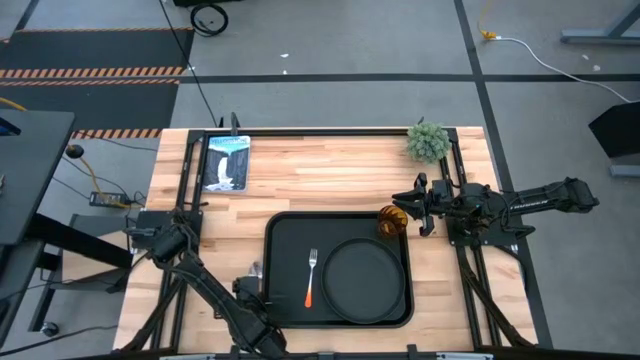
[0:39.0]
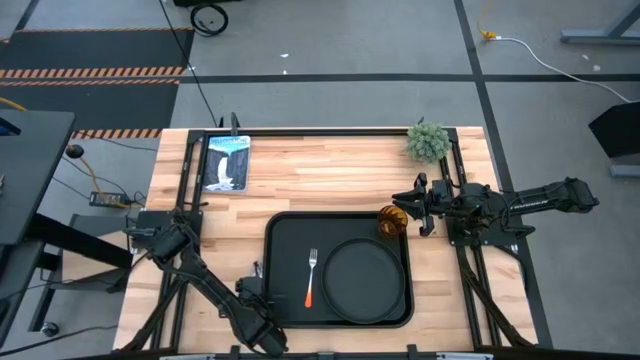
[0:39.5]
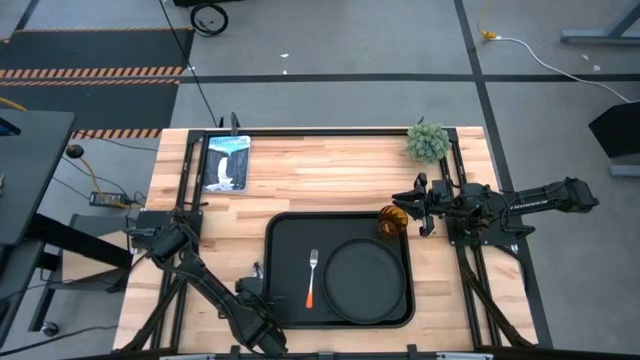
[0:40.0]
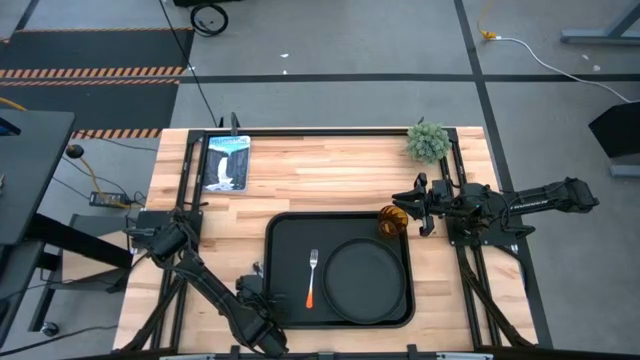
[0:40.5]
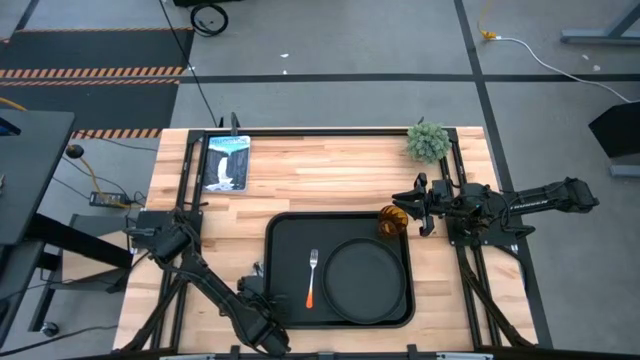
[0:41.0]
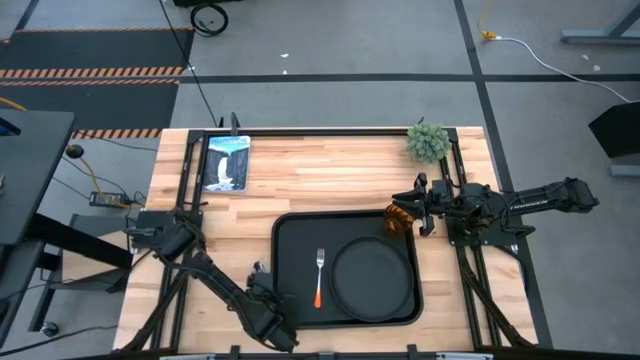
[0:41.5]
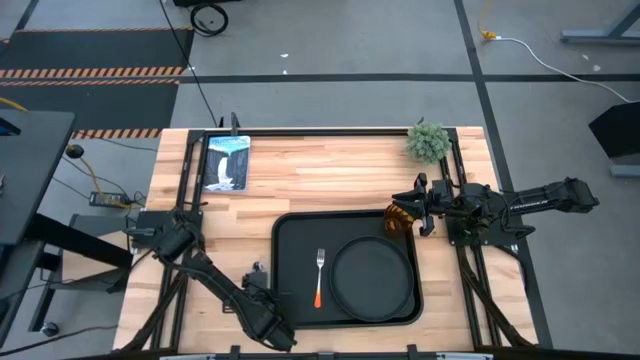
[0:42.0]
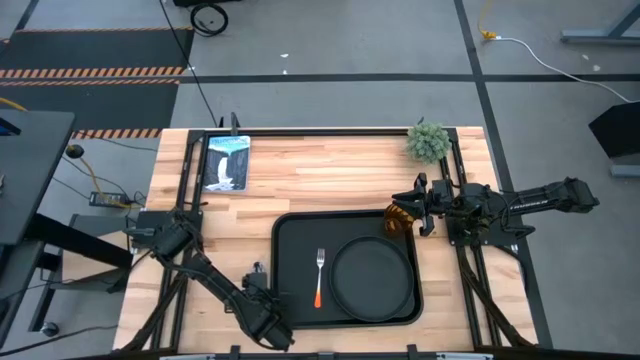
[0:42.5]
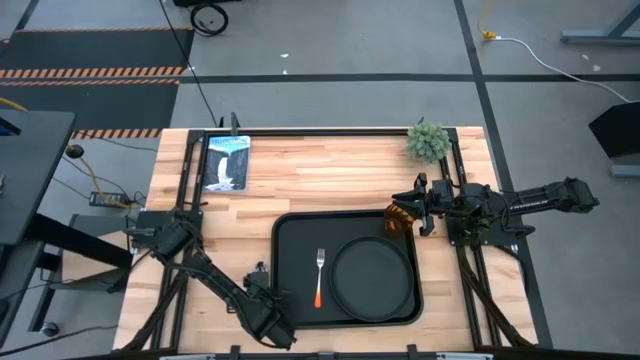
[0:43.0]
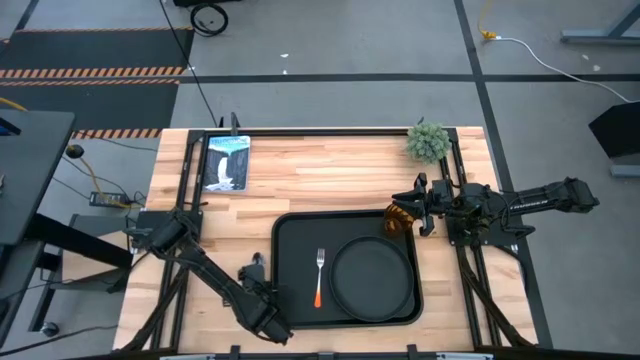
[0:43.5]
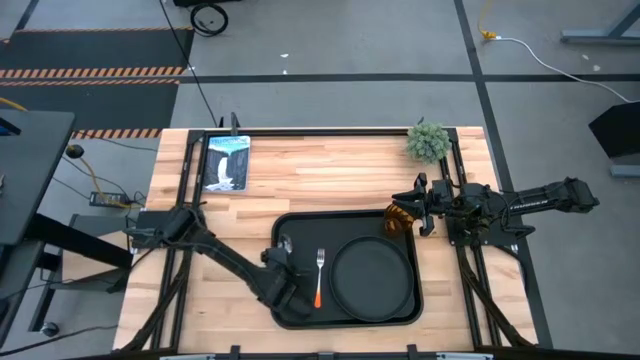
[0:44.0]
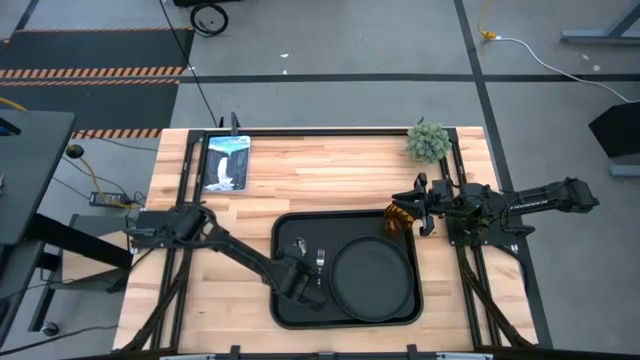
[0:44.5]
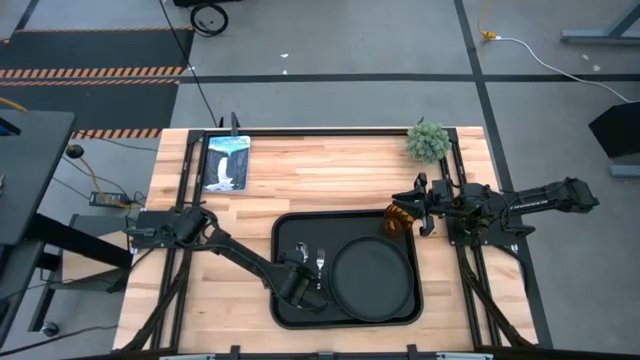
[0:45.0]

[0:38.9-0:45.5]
Task: Pick and place plate/cup/fork/spoon on tray
Put the yellow spoon to the left of the orange fork on the black tray

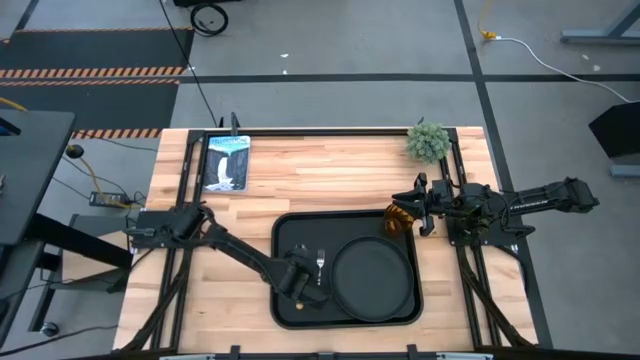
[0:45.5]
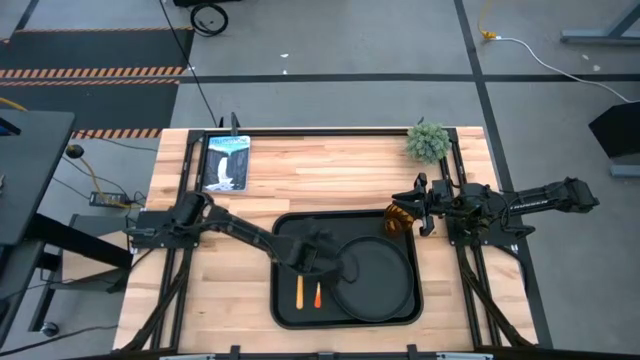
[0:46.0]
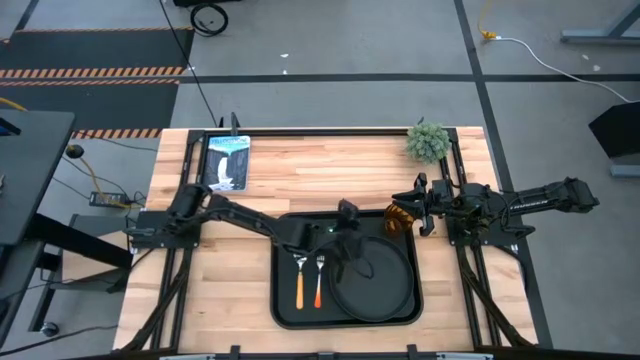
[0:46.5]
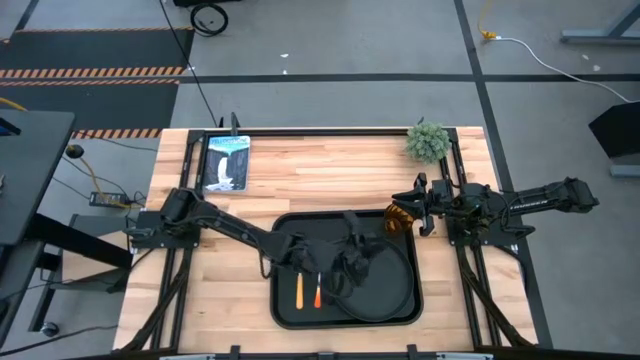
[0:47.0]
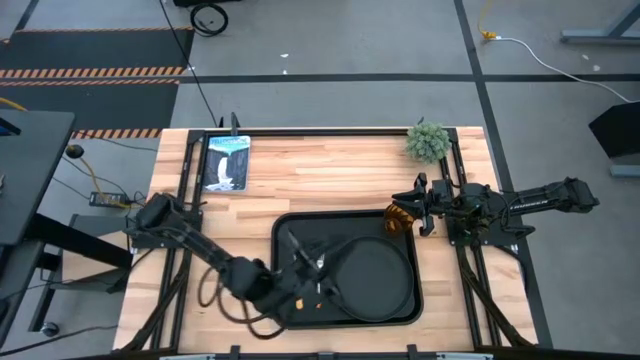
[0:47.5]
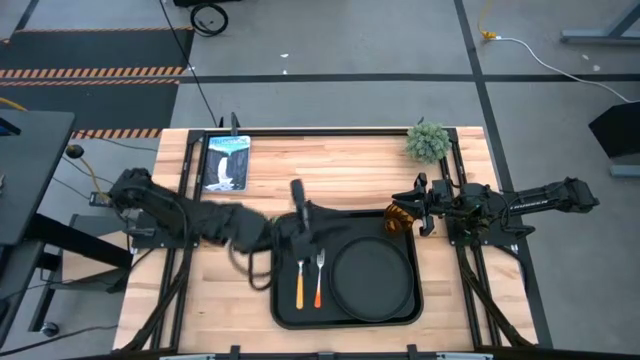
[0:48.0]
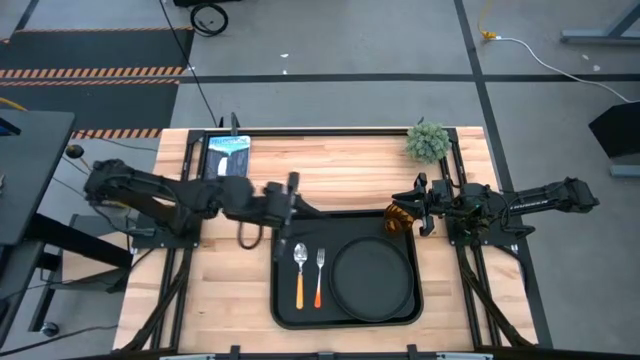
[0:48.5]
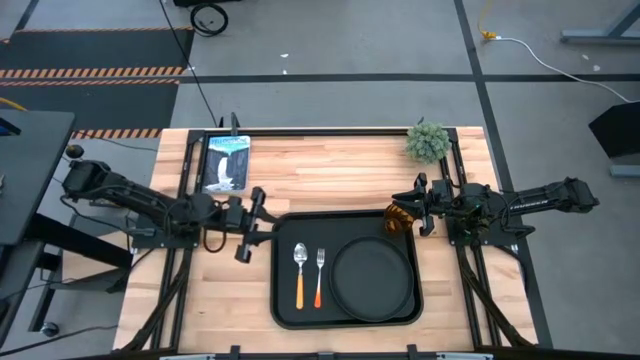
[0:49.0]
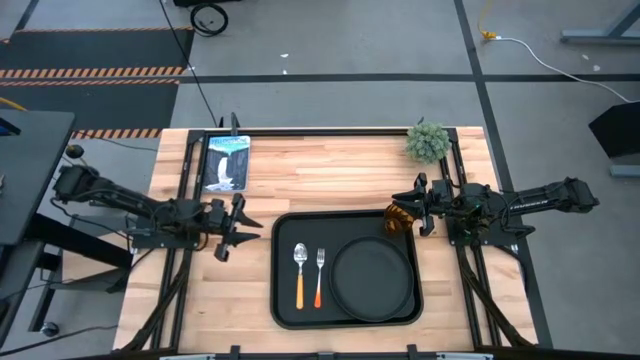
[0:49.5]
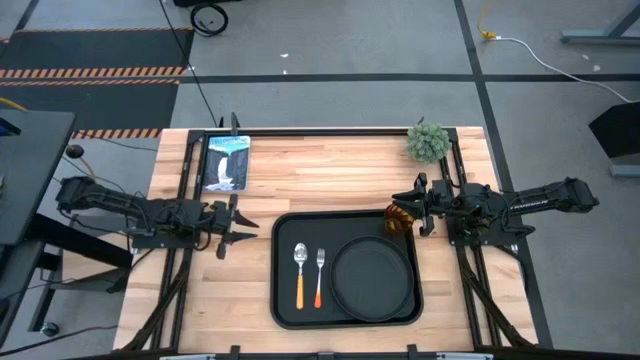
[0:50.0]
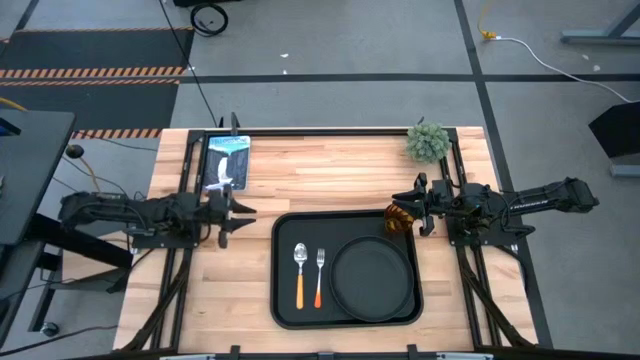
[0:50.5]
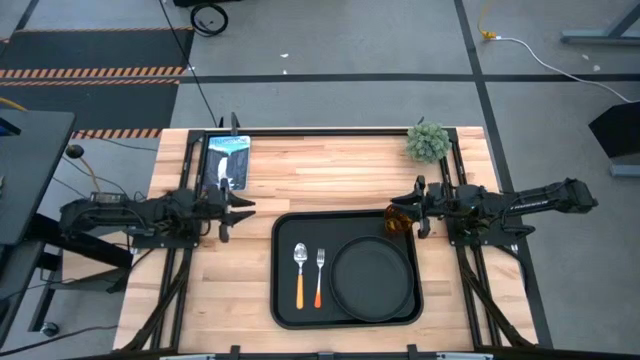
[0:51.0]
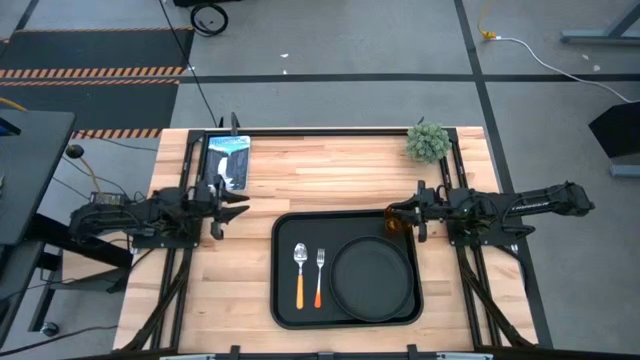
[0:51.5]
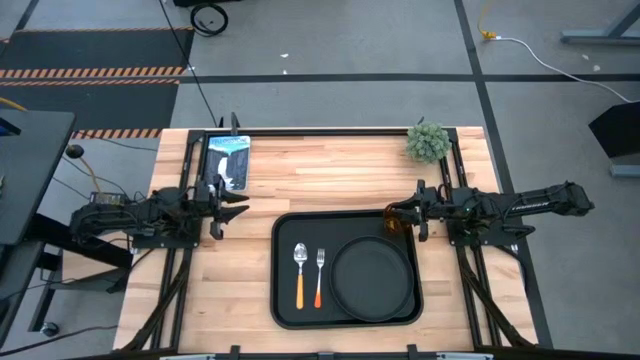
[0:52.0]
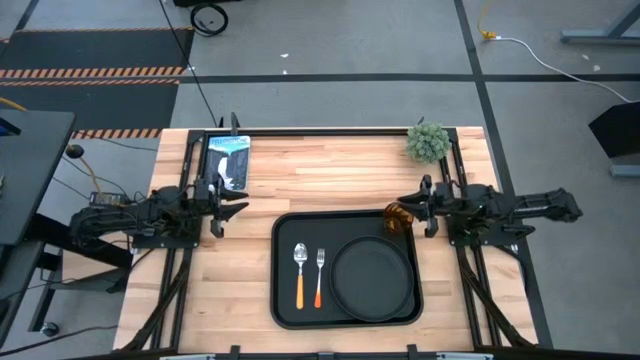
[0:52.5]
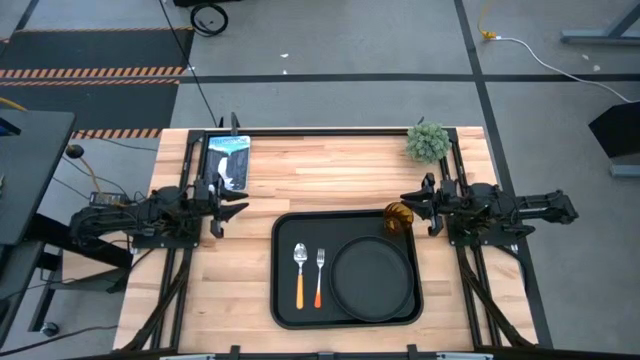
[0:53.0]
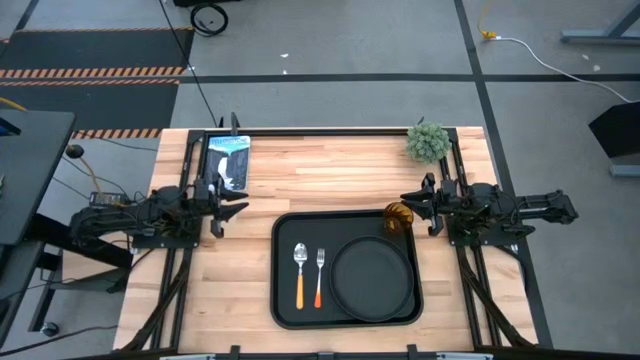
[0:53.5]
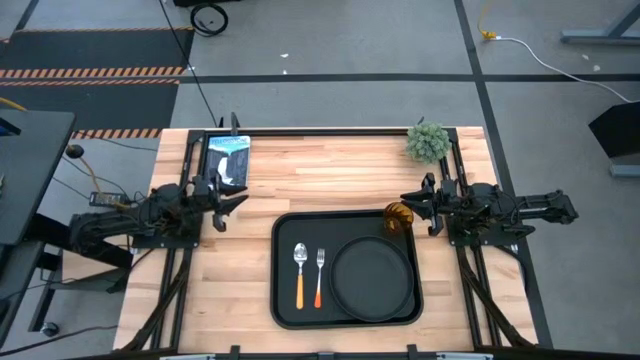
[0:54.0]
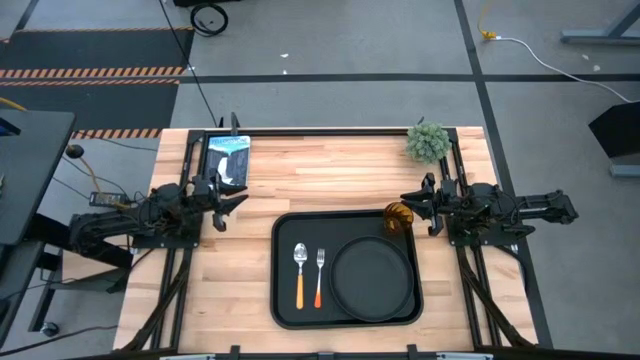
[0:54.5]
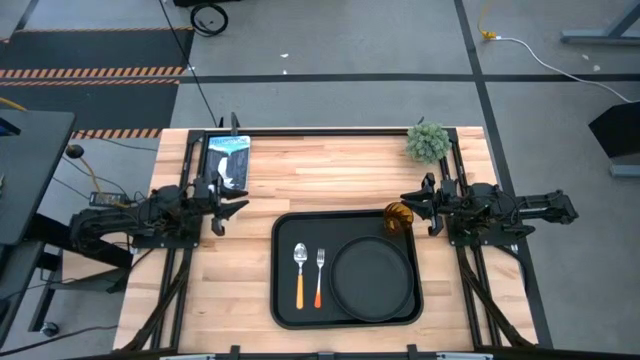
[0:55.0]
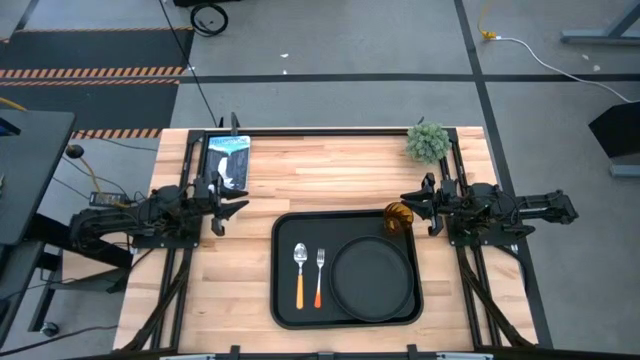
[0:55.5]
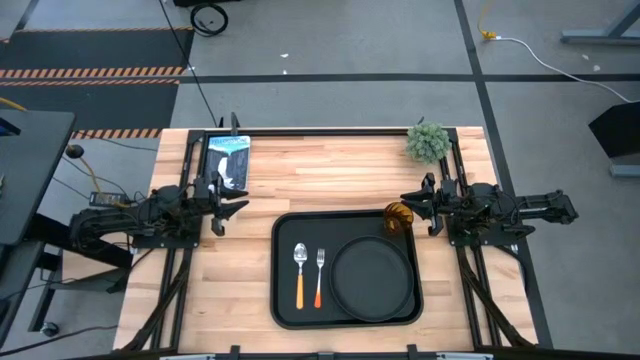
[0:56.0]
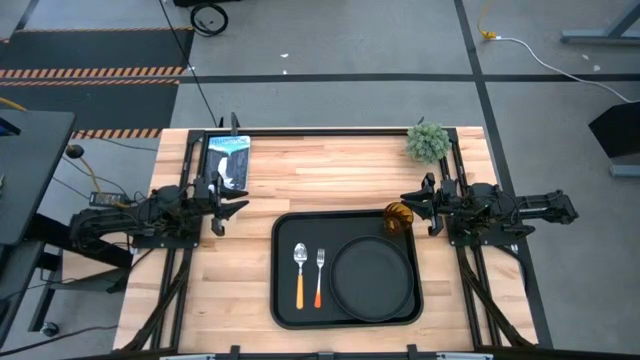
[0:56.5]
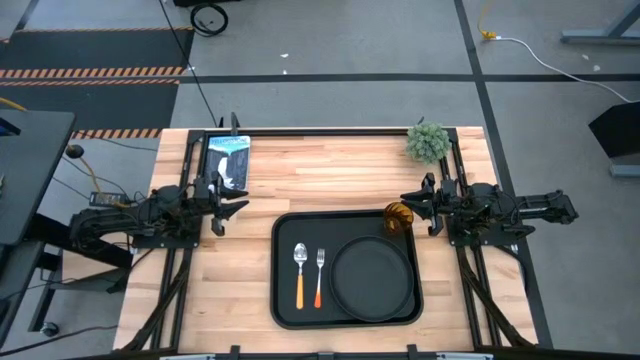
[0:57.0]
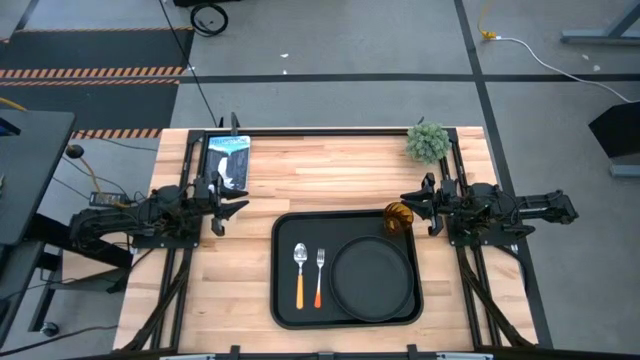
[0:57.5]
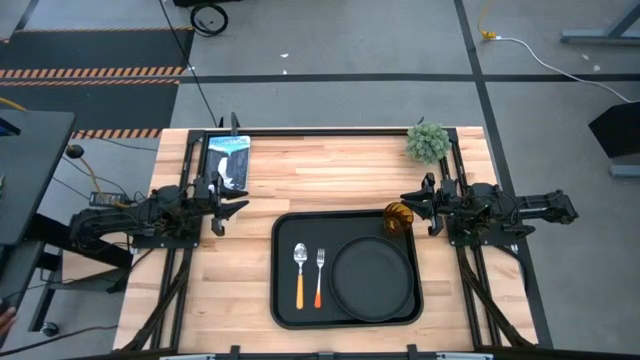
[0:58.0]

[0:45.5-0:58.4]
Return to Home Position

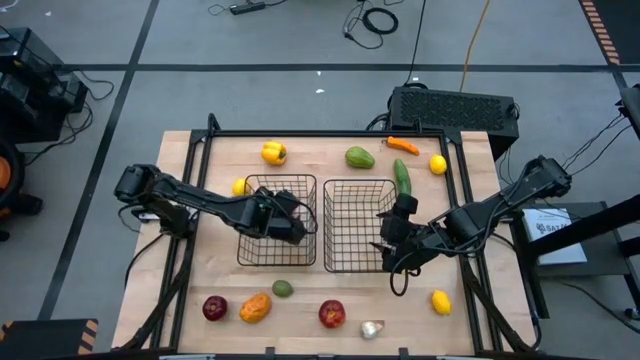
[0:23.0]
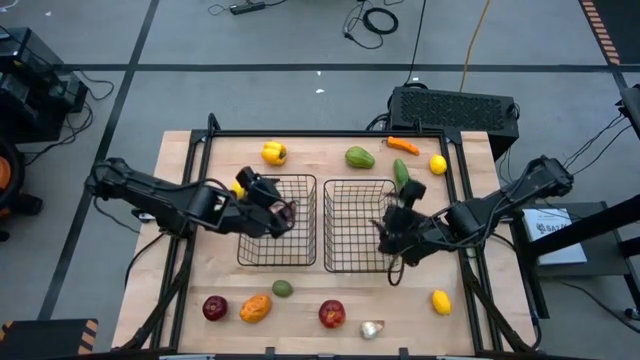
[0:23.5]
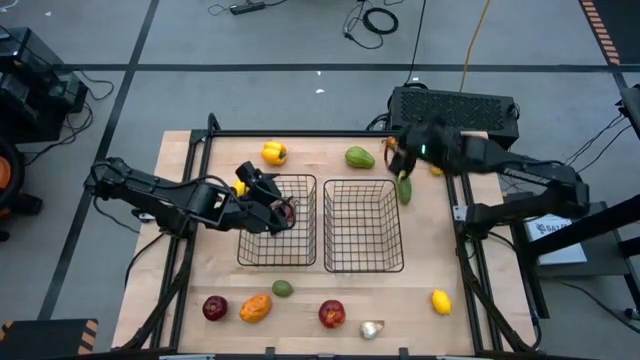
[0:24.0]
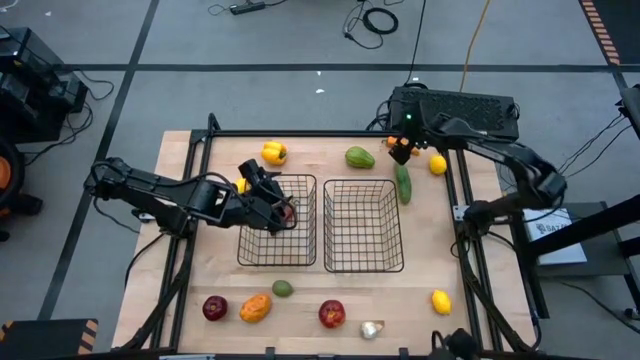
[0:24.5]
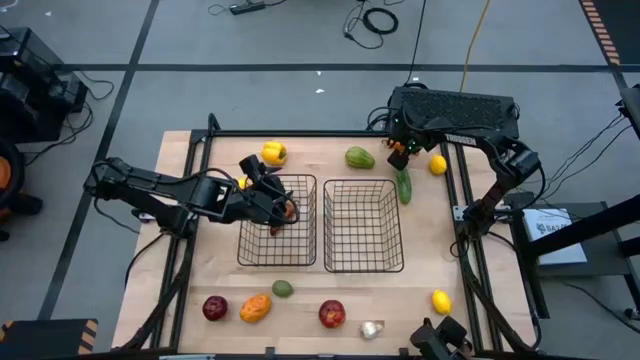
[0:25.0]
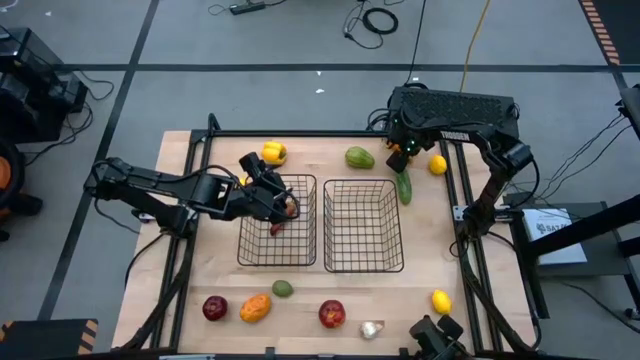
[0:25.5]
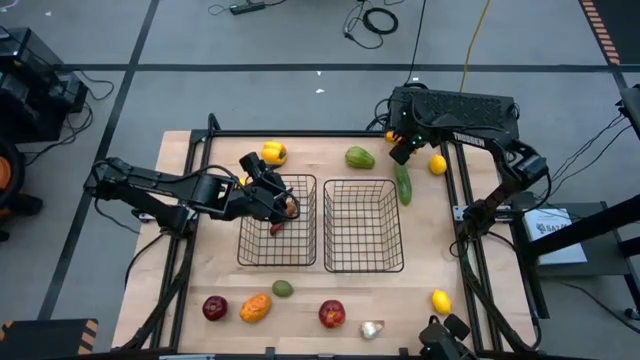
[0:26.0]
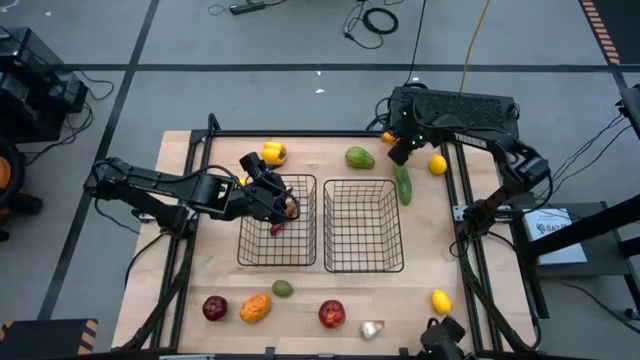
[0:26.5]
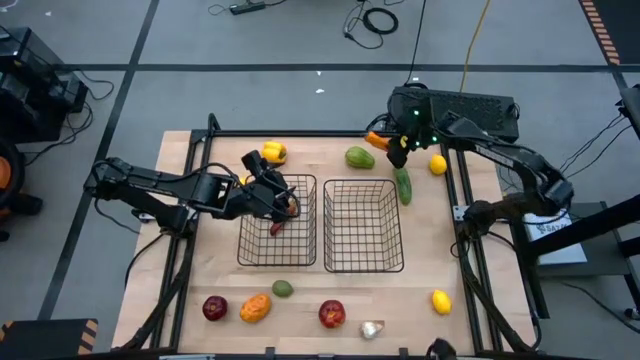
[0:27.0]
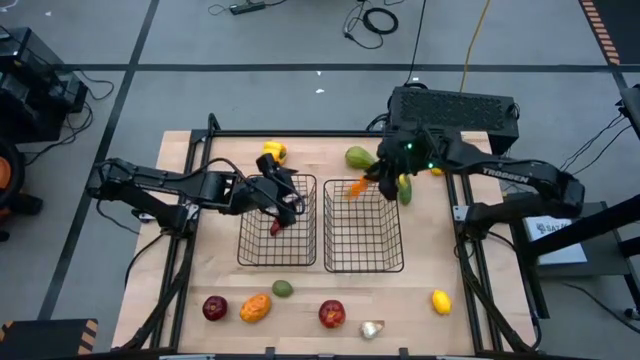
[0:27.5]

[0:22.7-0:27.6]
Task: Sort produce into baskets
Put the yellow chili pepper into the left black wire basket
